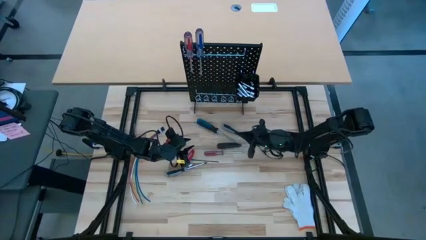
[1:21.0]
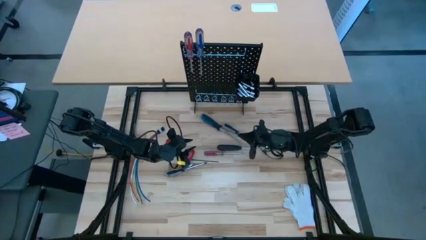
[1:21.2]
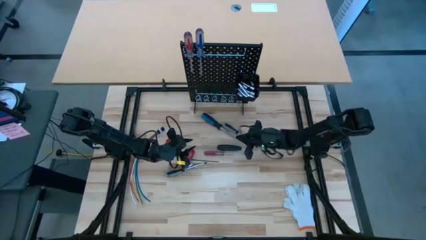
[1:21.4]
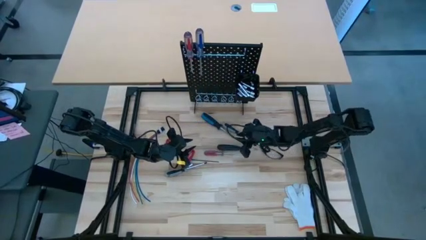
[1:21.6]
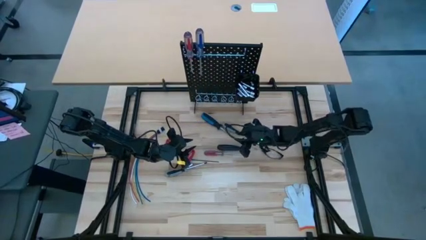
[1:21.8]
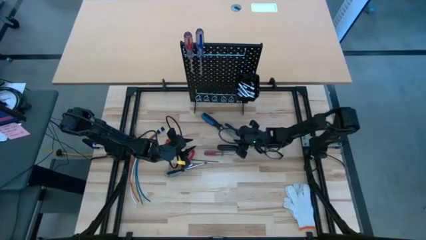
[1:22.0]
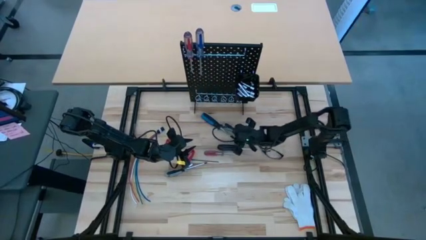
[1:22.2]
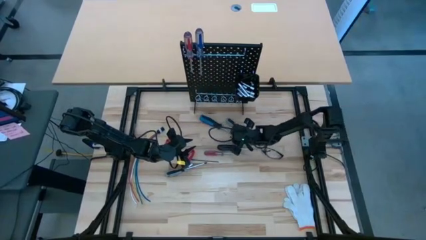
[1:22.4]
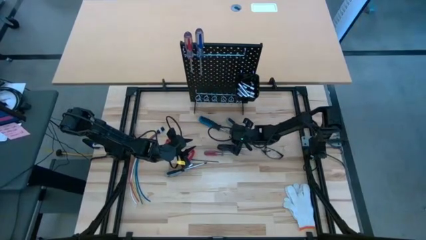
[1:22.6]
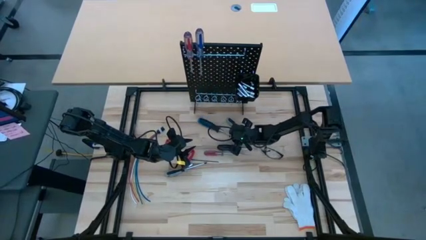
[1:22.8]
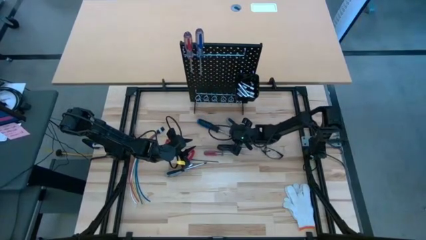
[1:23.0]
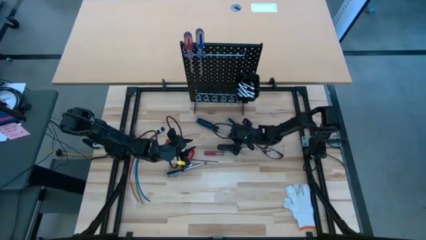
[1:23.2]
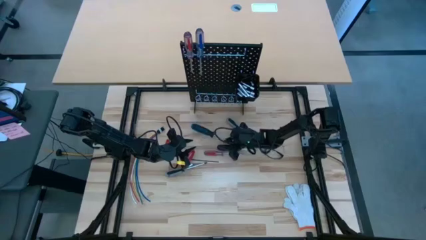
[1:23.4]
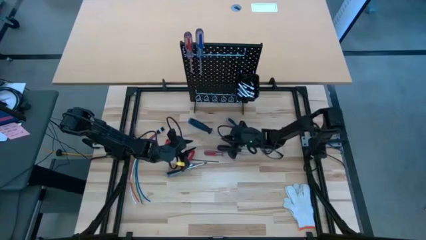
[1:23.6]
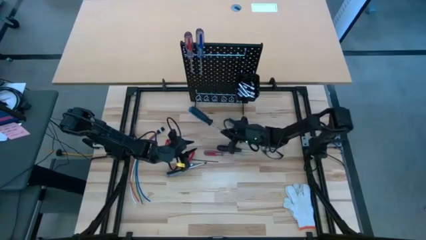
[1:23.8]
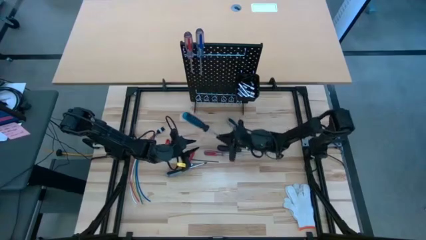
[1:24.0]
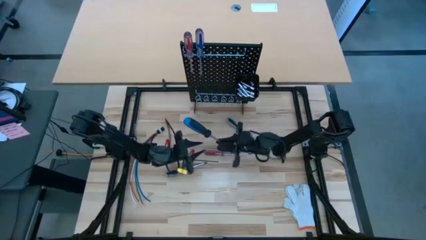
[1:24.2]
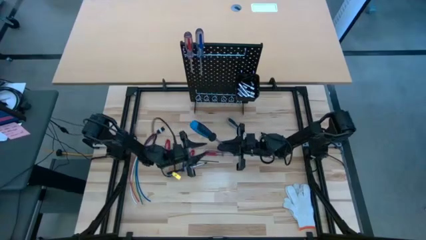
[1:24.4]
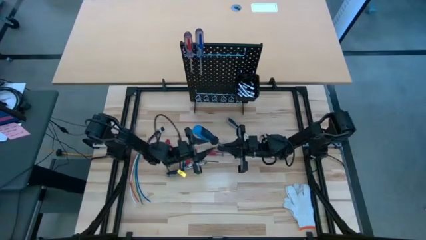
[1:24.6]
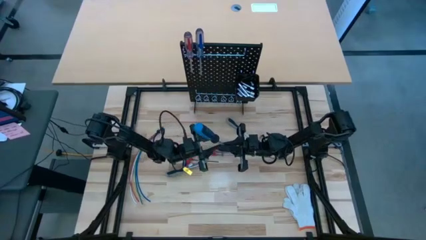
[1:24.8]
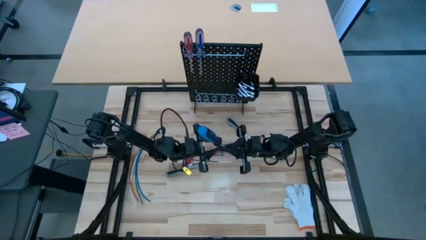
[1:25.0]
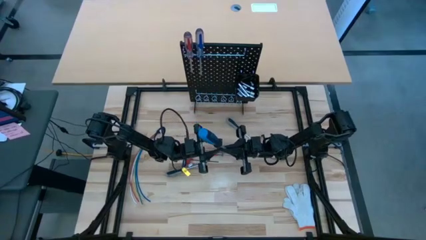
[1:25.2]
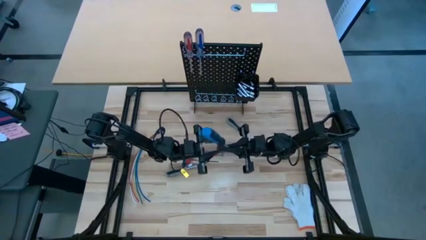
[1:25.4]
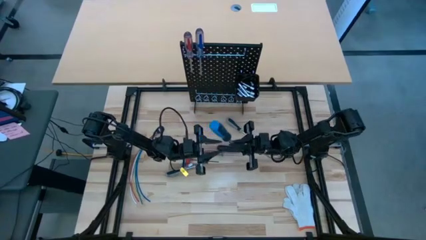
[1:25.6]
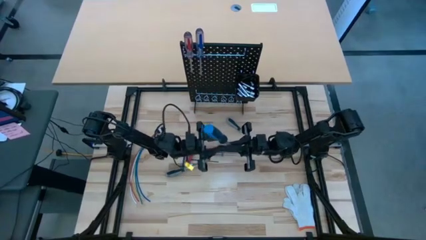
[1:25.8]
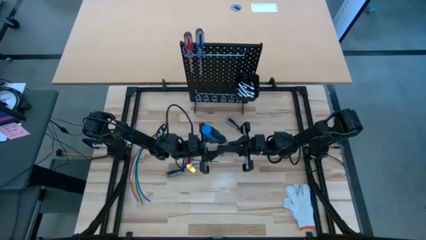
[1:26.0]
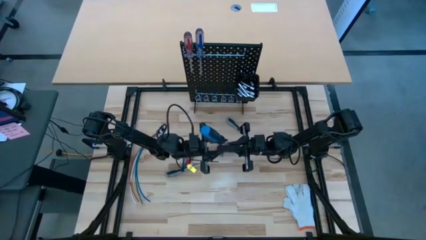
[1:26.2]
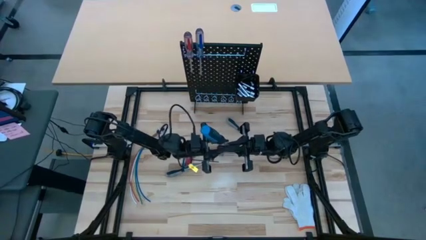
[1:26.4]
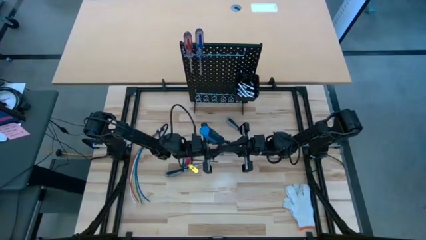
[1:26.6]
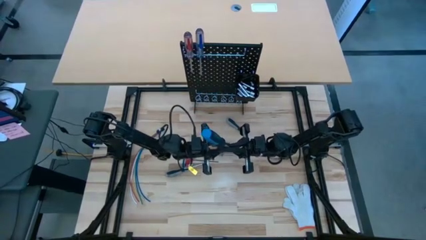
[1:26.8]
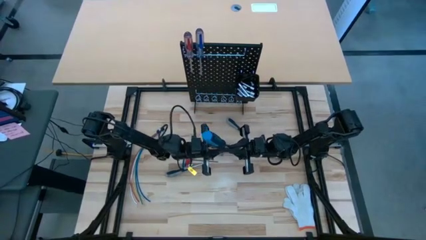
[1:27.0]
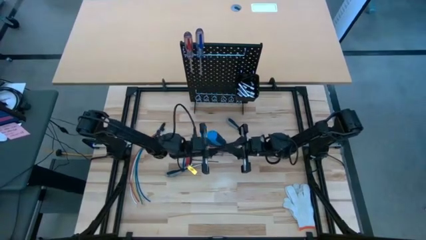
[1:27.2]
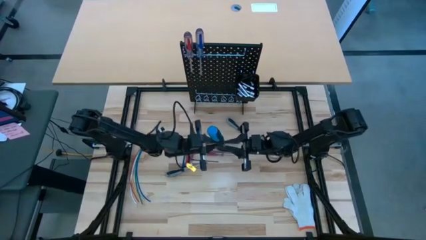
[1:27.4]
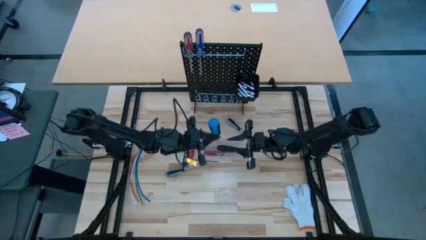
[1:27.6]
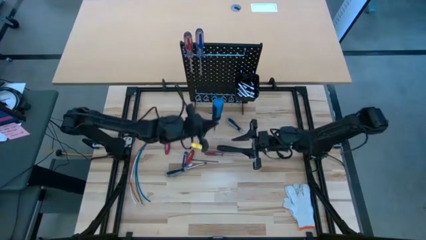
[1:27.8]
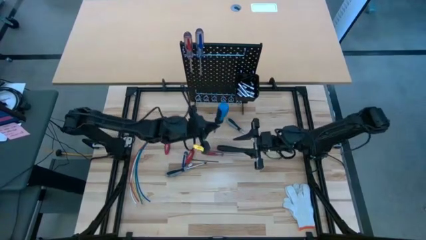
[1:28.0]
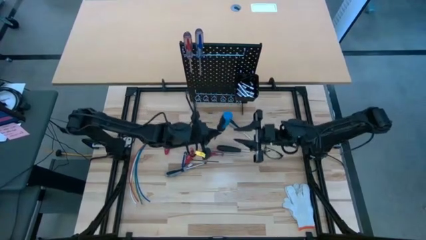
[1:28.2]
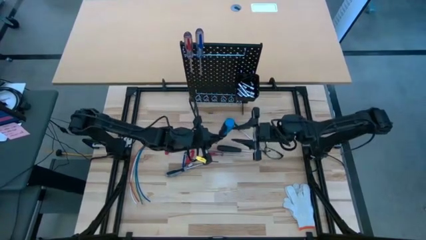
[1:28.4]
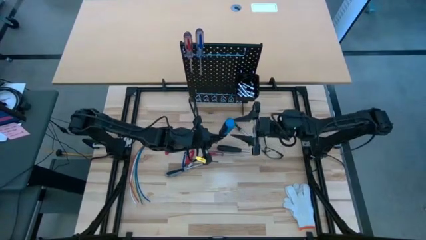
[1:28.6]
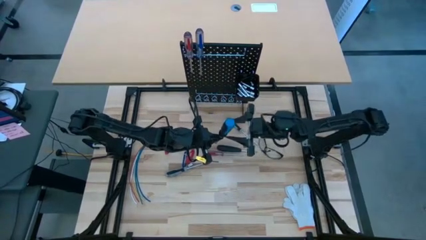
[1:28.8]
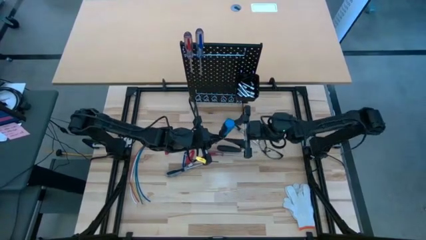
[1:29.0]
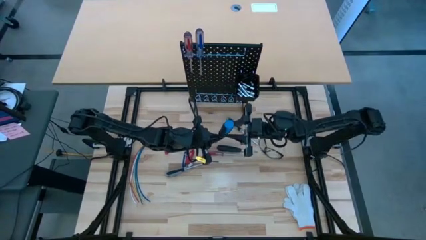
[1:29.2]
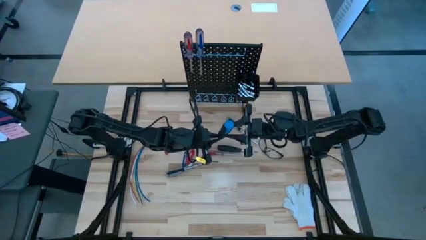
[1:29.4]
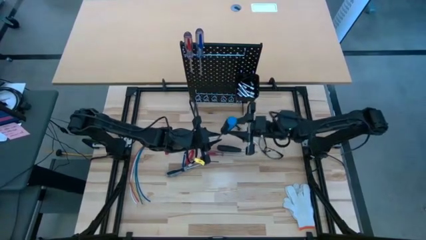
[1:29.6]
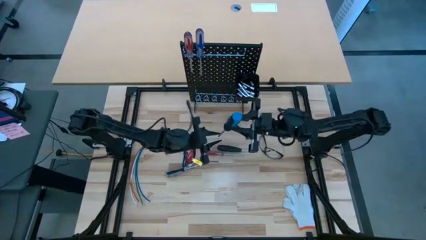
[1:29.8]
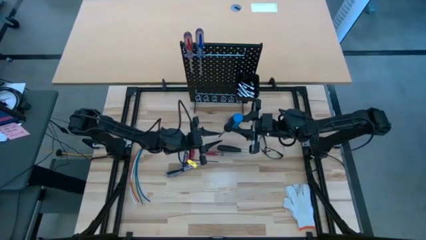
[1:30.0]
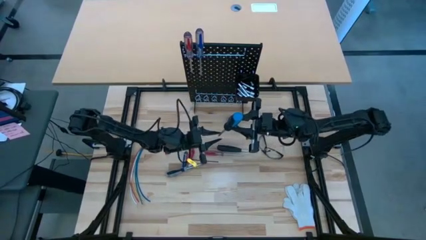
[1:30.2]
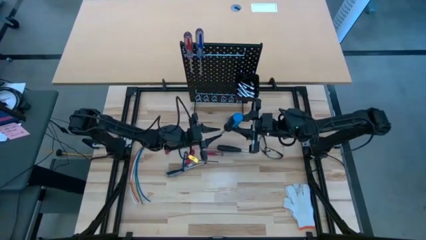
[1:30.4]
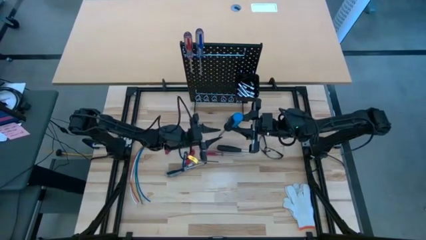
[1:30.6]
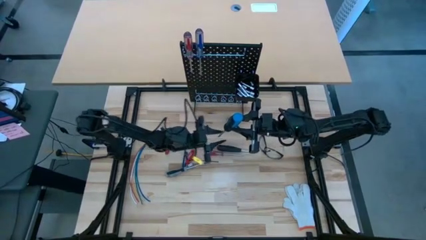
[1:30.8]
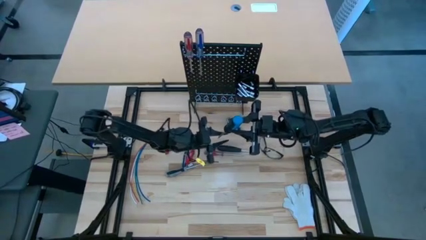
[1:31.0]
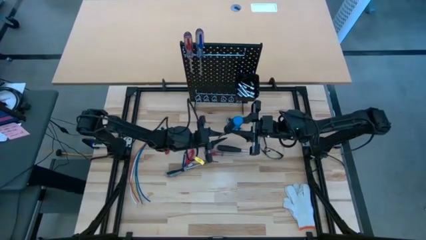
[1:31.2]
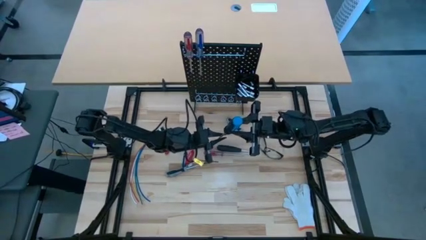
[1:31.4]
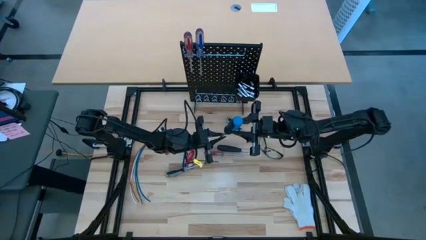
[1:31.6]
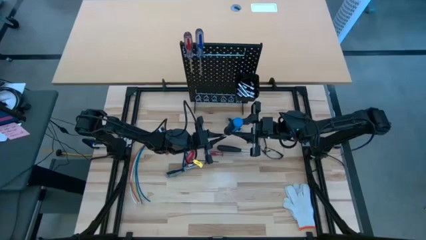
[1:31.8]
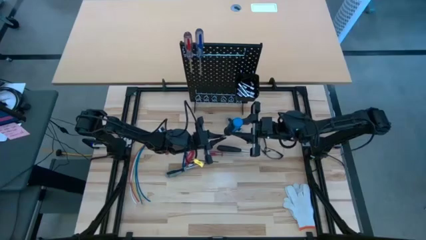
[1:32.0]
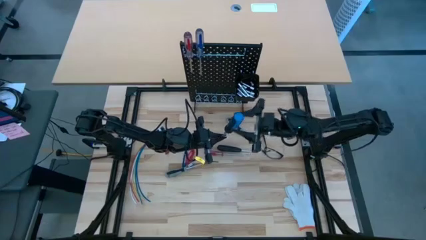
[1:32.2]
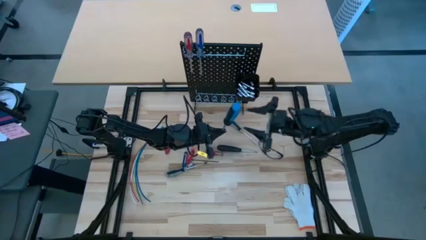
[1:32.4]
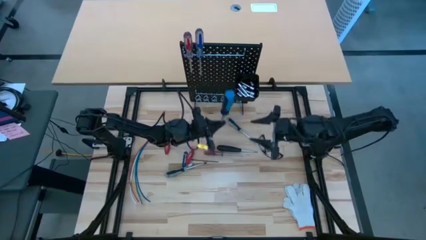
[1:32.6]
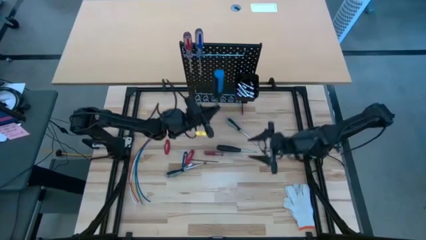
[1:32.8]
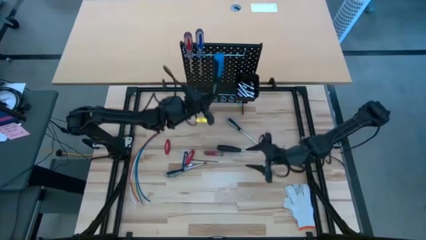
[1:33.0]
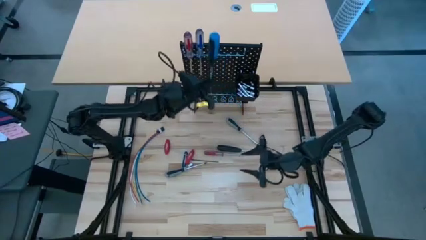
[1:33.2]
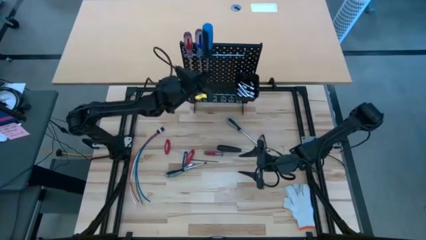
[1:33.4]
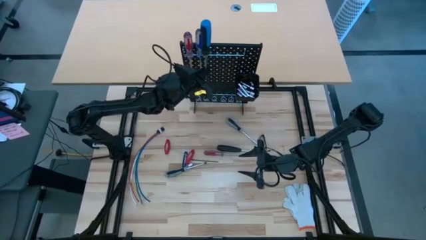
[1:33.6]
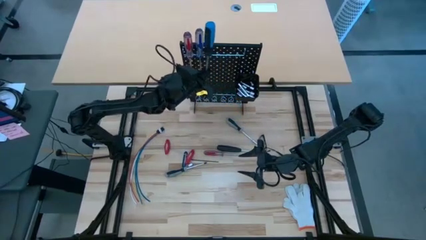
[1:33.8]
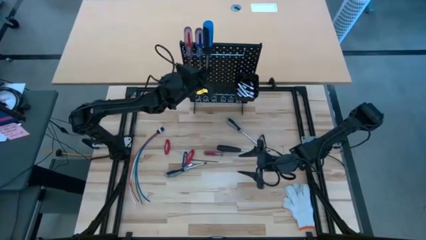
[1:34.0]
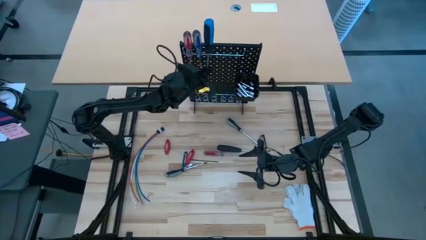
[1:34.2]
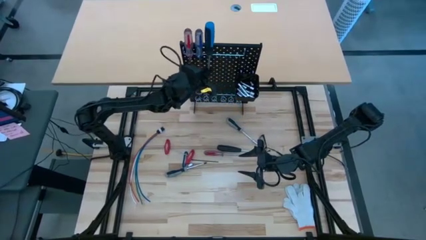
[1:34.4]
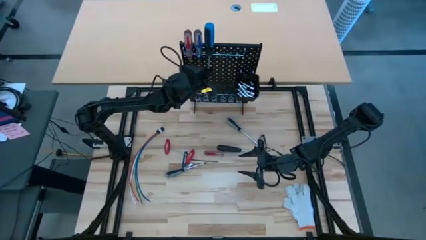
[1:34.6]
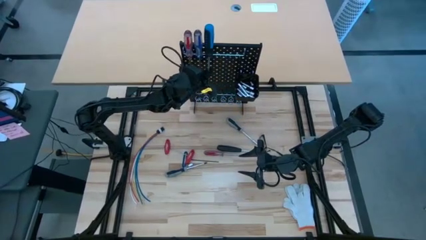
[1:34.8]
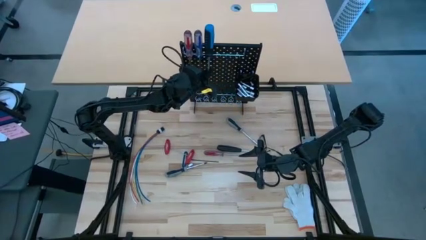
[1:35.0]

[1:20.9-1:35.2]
Task: Hang tools onto peg board
Hang the blue screwdriver on the pegboard
